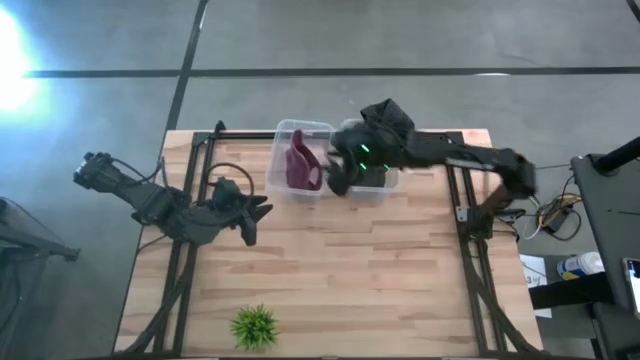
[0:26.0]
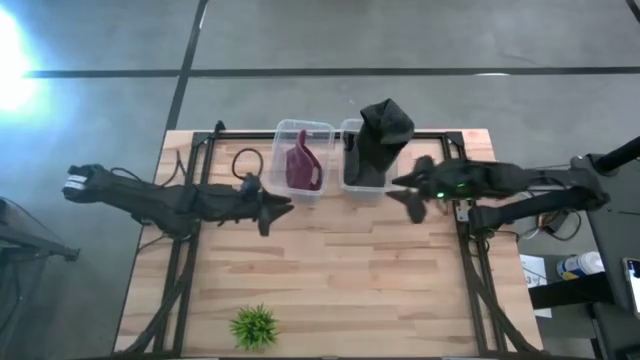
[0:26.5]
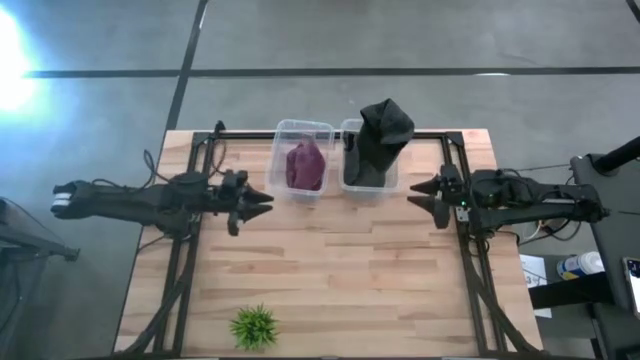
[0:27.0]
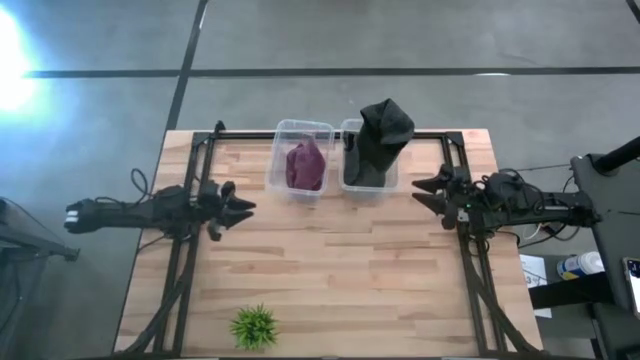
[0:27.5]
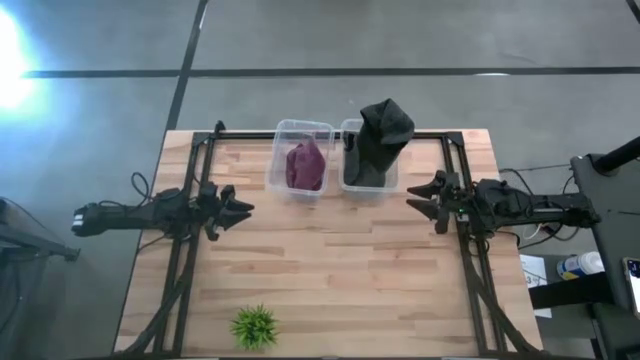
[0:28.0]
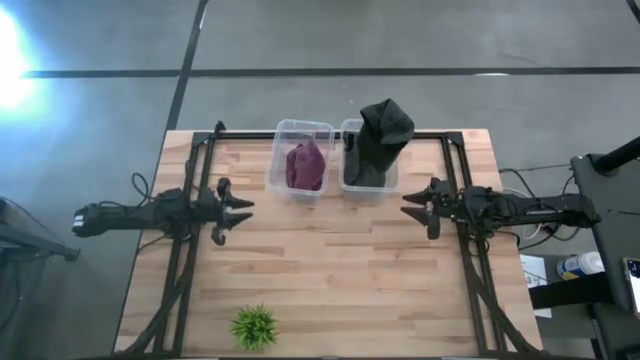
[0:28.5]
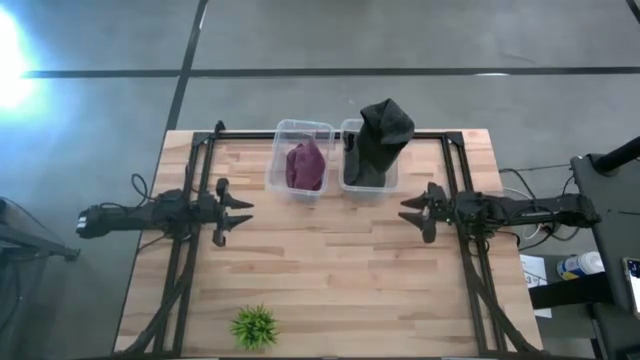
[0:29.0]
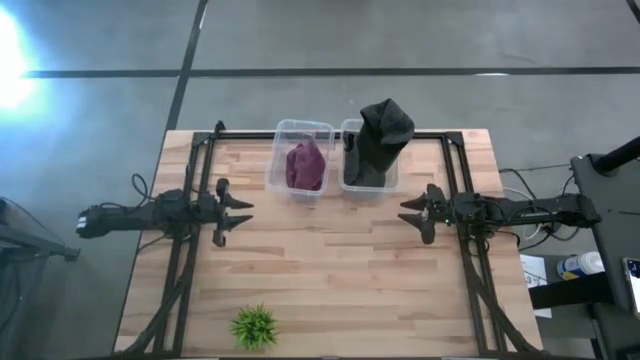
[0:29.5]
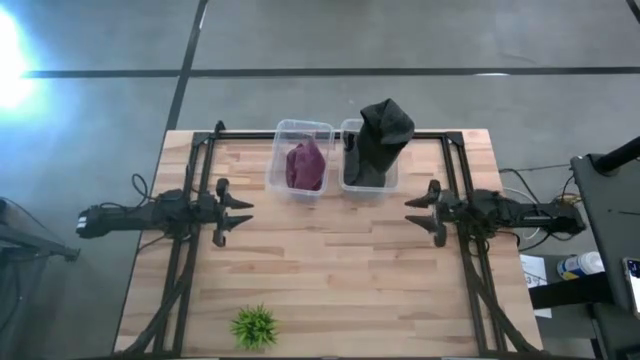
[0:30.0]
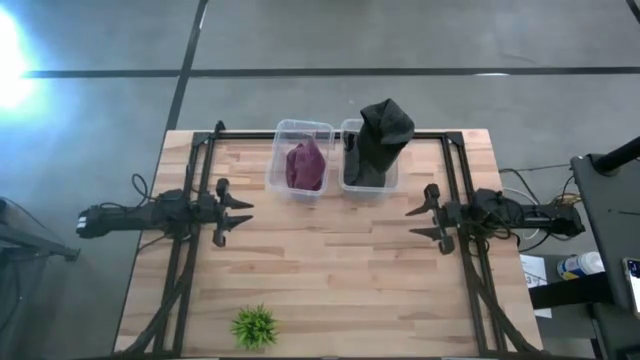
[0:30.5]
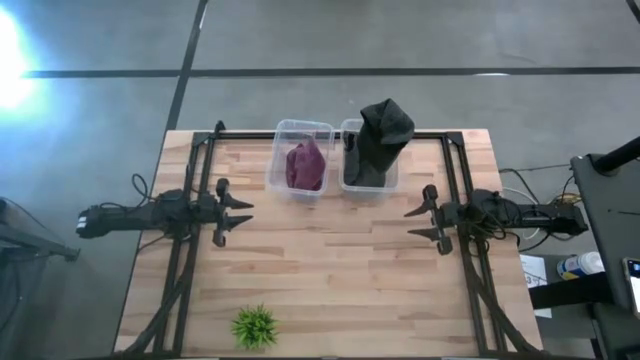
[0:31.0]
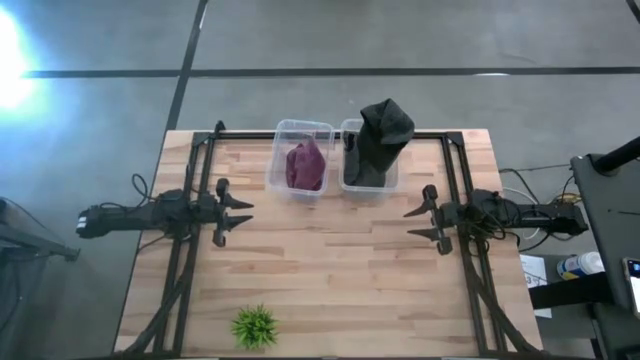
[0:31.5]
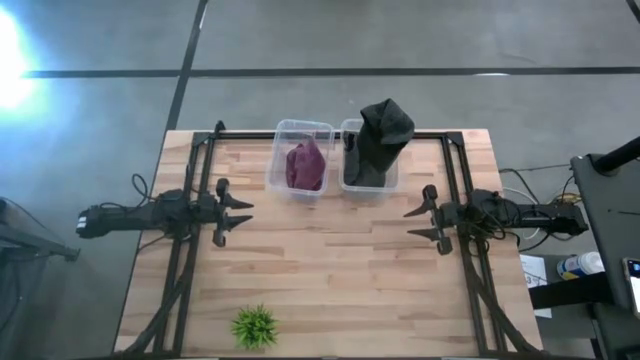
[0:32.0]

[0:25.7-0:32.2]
Task: Pick & Place hat
Return to Home Position

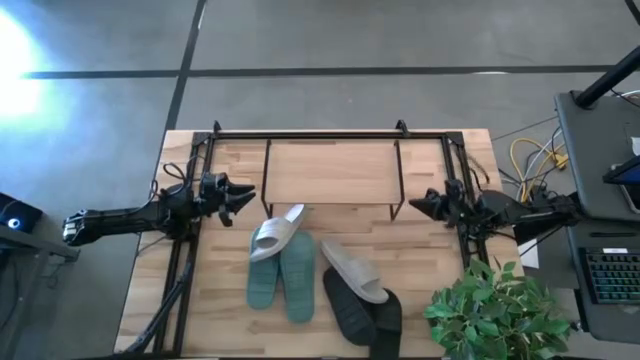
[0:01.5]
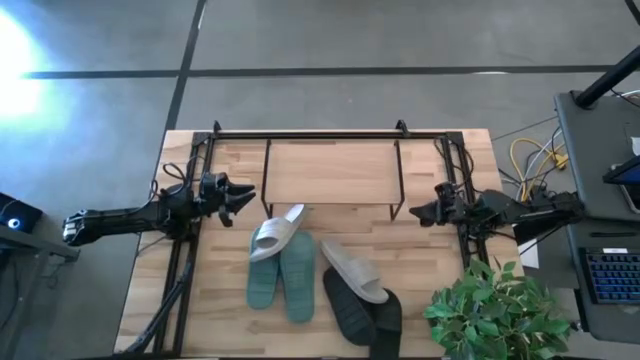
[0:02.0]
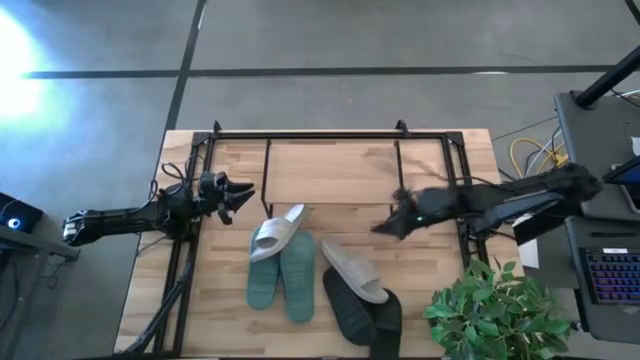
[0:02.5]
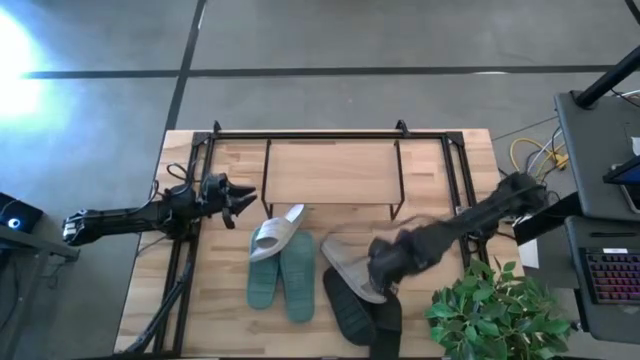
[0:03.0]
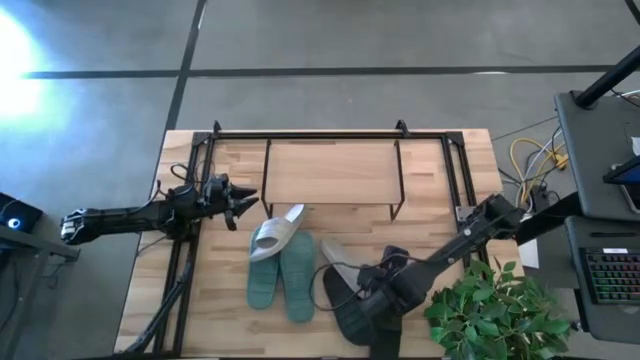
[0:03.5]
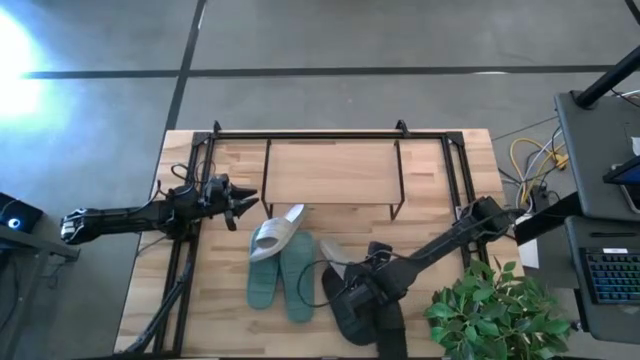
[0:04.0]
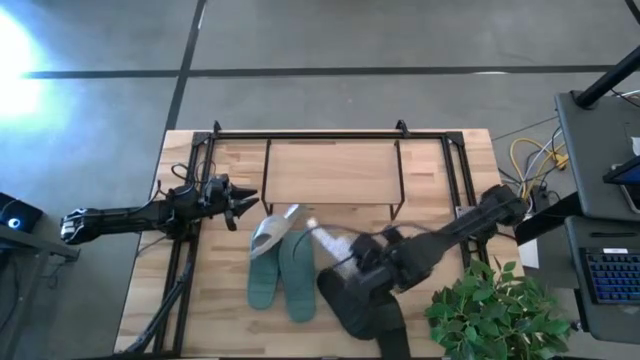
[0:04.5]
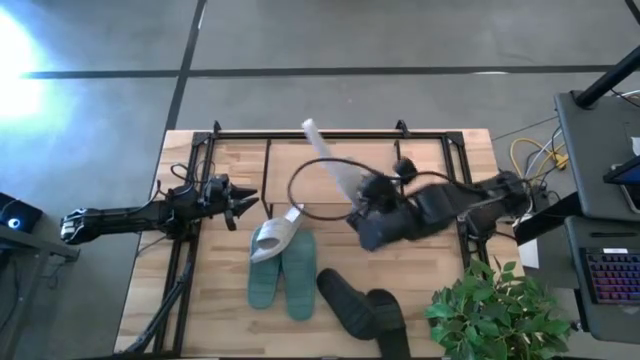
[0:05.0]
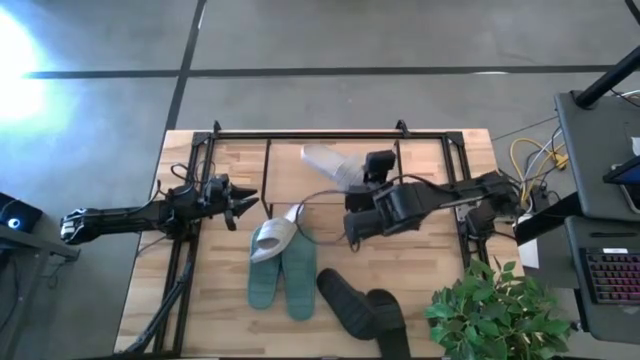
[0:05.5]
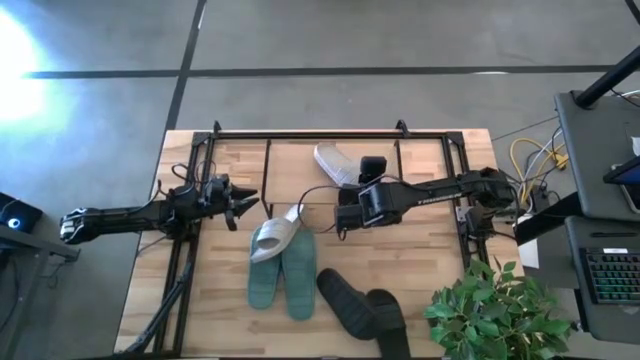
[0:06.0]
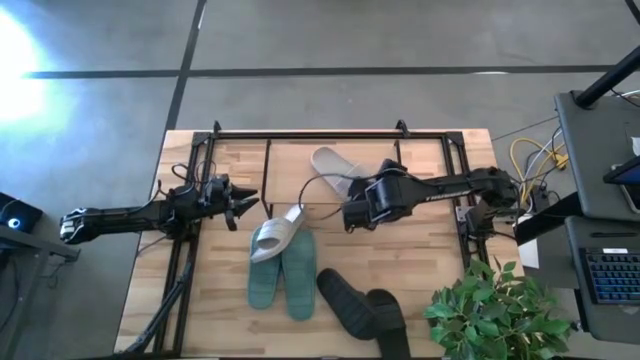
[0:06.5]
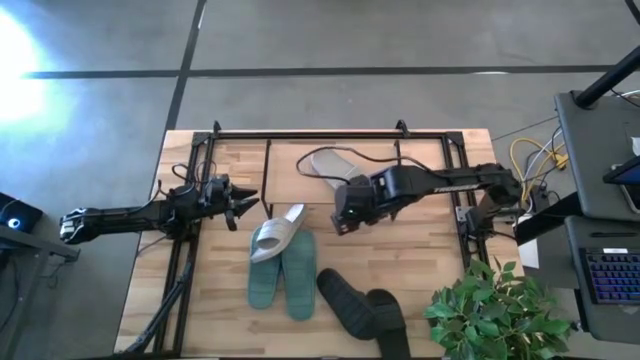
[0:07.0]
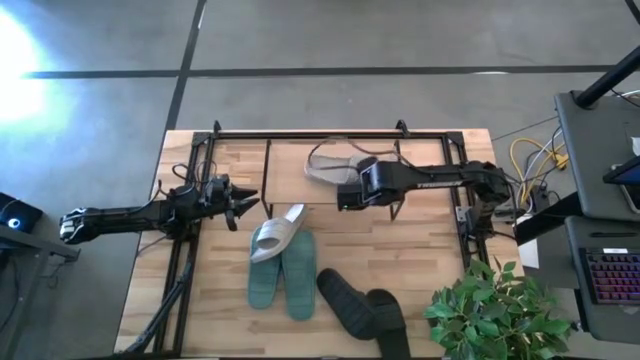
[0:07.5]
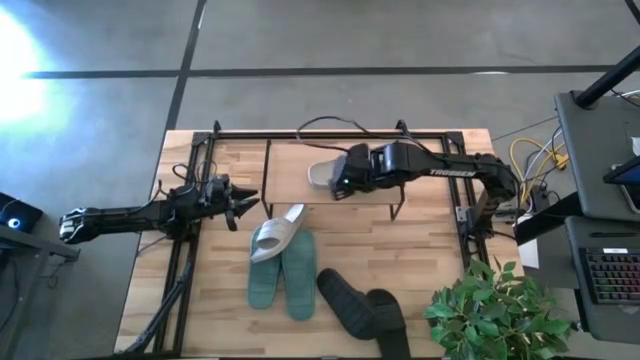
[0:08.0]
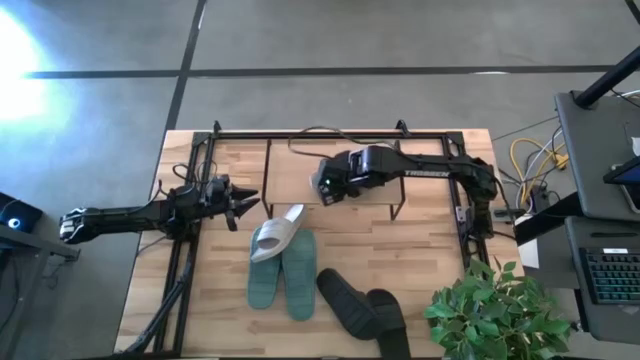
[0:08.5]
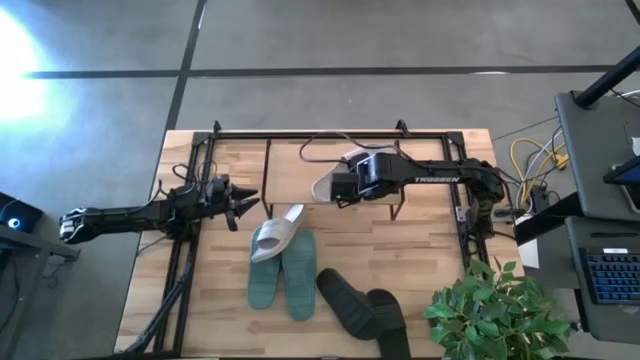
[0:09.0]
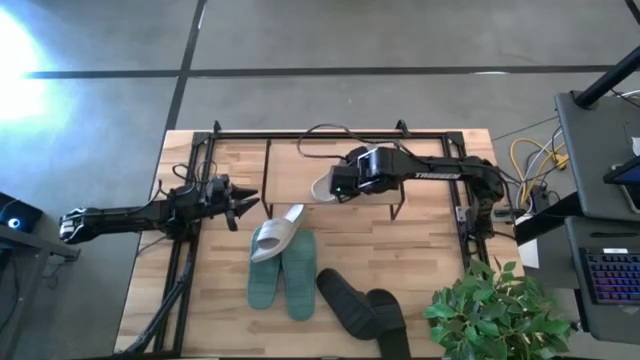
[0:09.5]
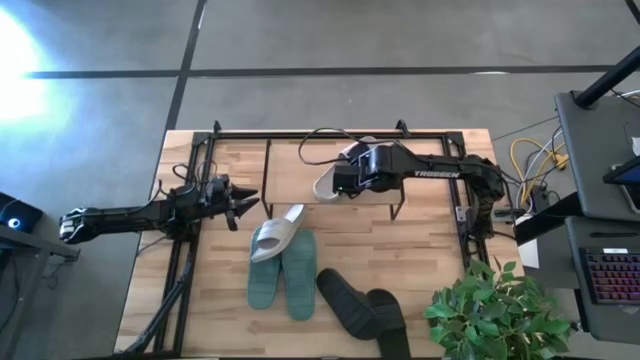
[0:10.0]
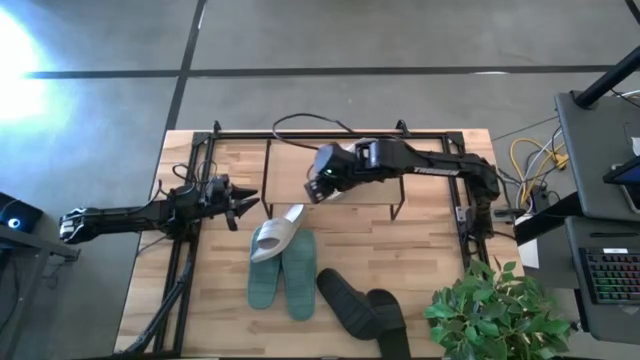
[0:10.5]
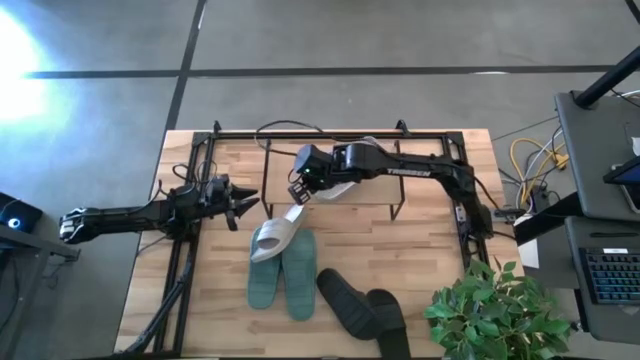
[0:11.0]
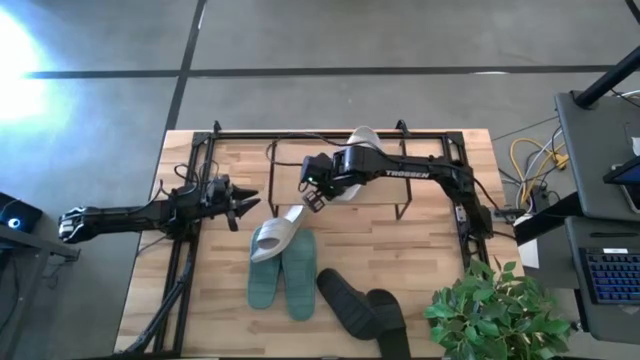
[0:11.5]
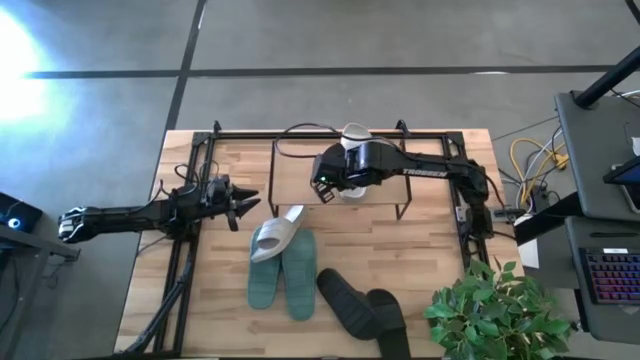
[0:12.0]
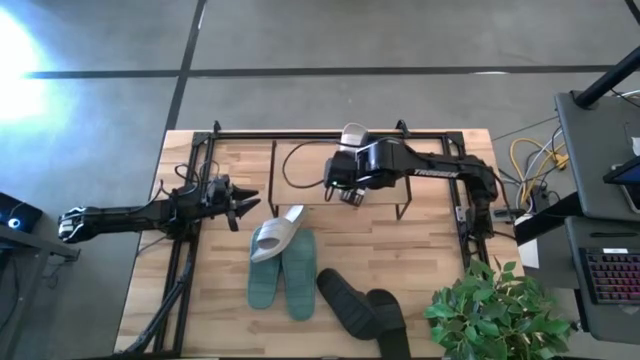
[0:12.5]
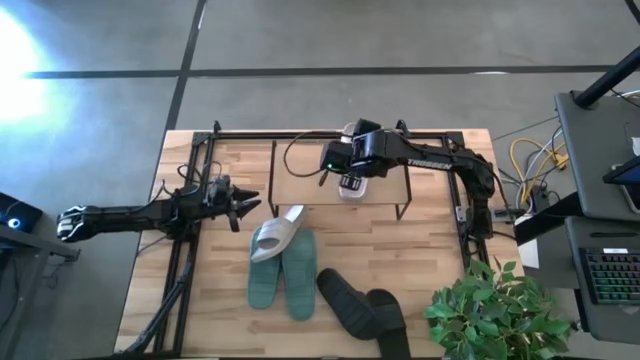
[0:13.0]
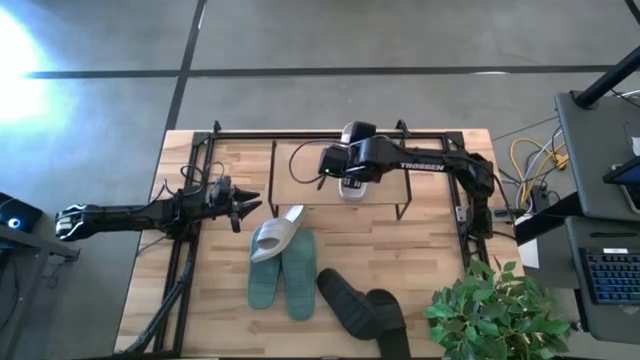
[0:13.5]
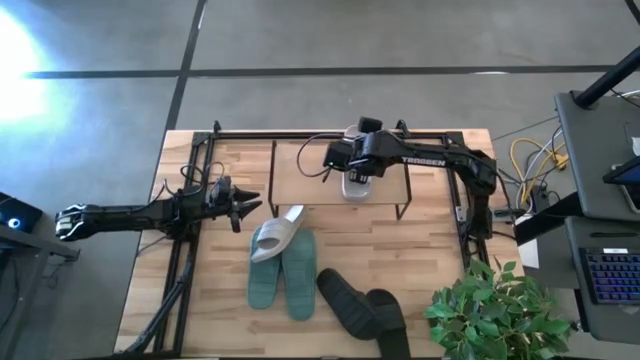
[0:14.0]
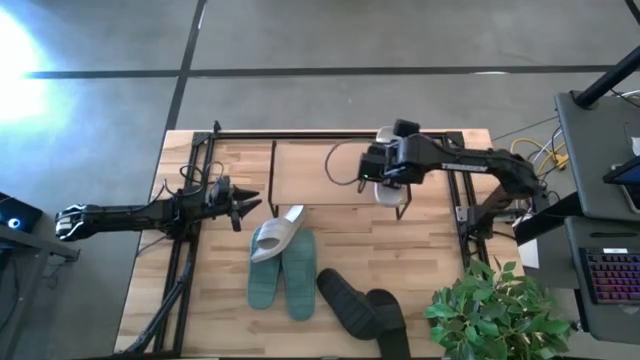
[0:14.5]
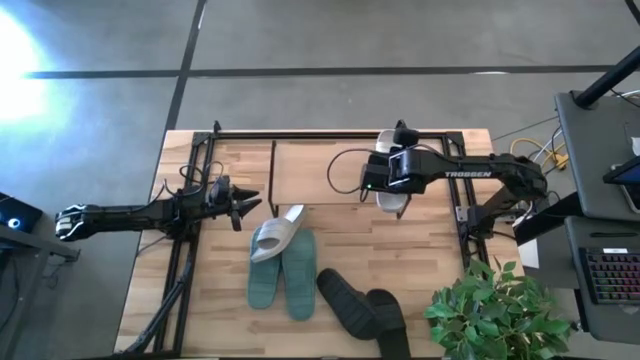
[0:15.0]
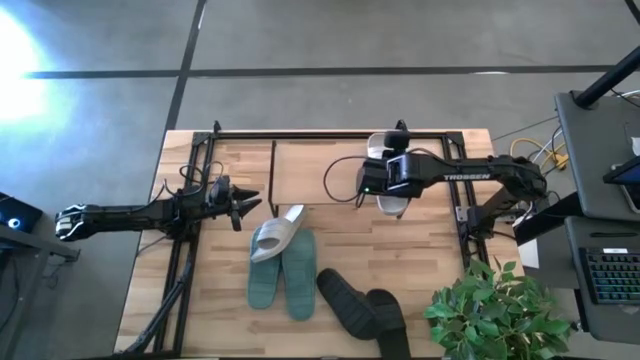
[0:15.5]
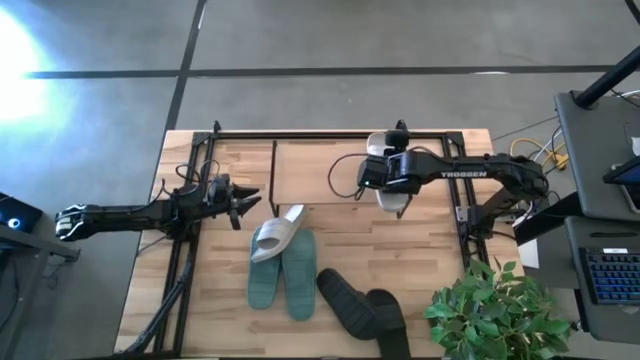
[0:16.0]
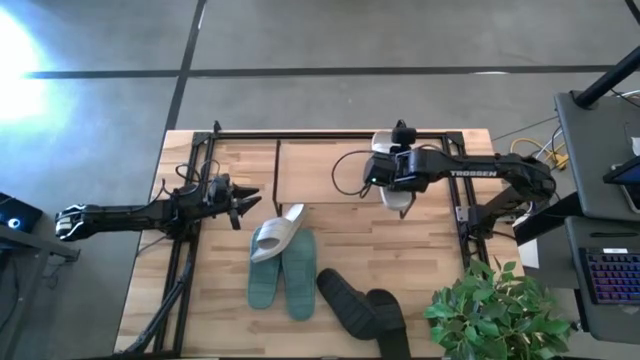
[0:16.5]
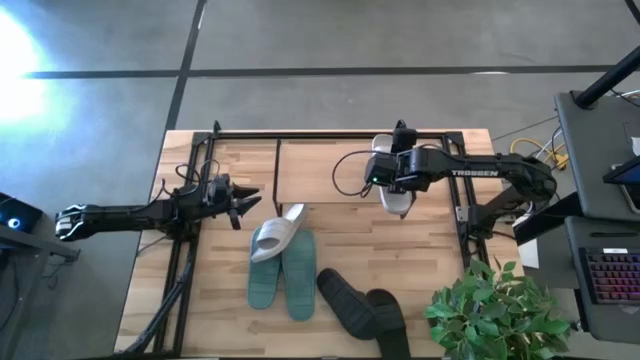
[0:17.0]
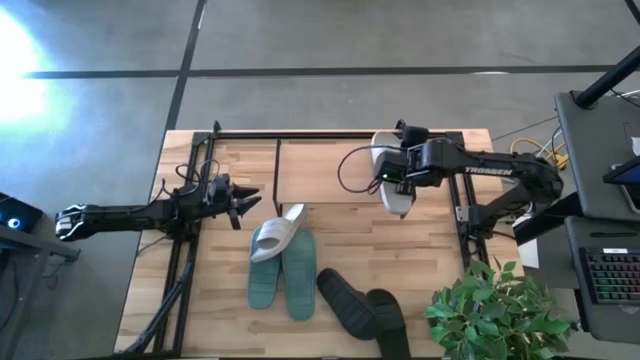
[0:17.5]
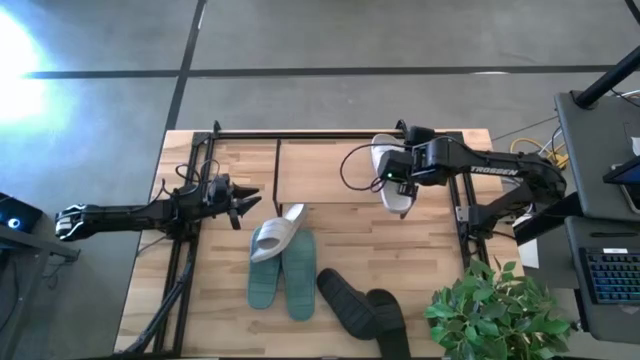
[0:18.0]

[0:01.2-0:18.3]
Task: Pick and place slides into the shelf
Put the right gray slide on the shelf
